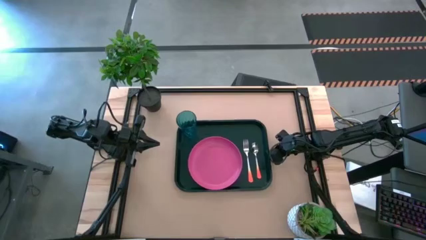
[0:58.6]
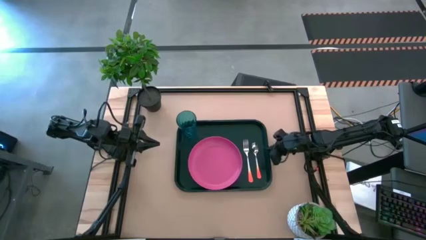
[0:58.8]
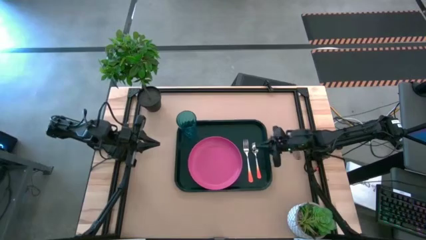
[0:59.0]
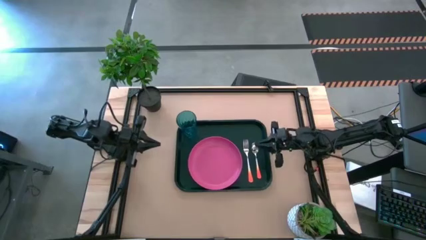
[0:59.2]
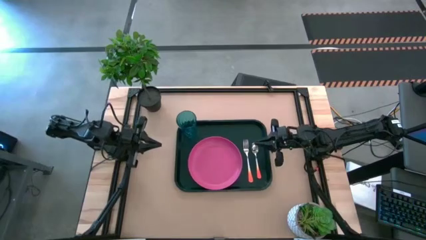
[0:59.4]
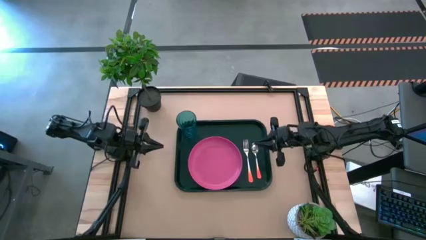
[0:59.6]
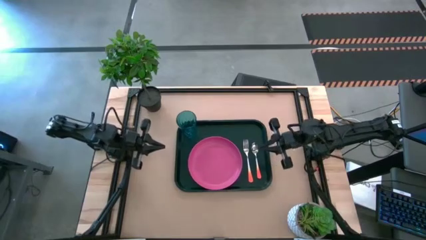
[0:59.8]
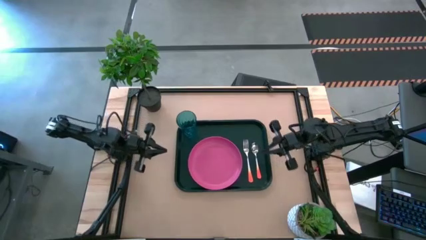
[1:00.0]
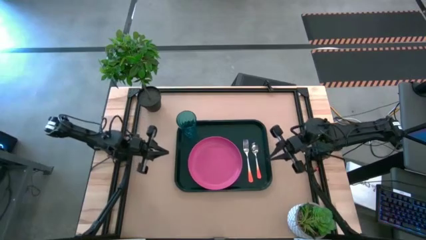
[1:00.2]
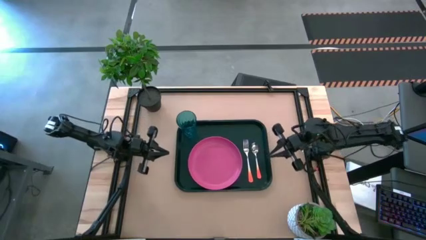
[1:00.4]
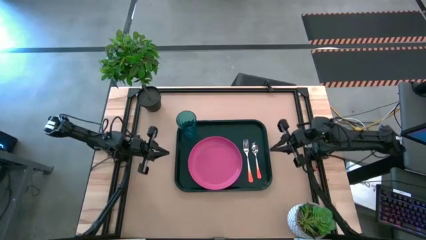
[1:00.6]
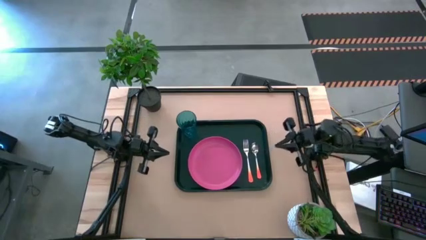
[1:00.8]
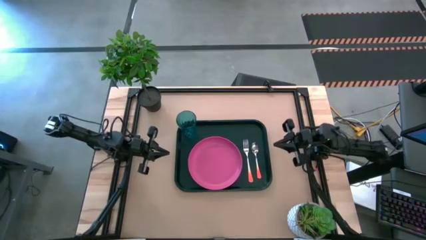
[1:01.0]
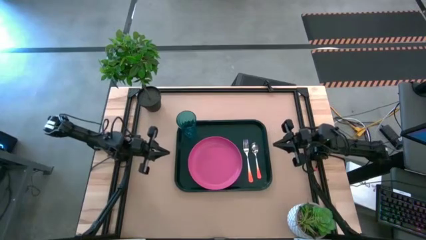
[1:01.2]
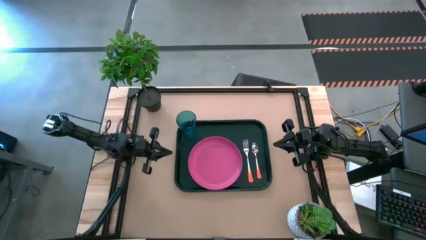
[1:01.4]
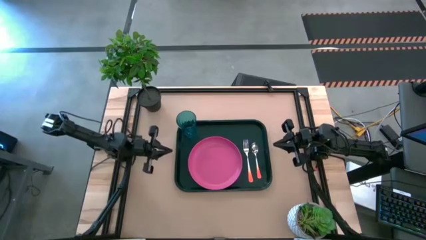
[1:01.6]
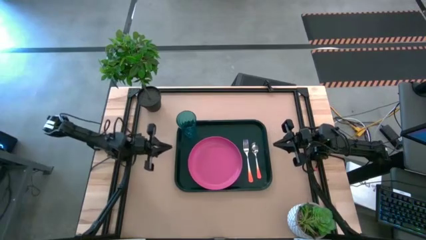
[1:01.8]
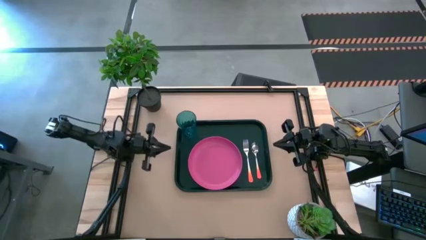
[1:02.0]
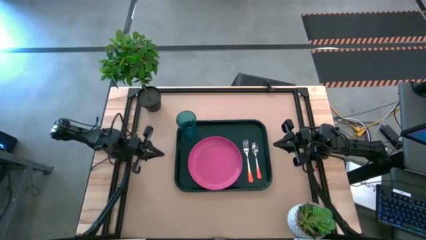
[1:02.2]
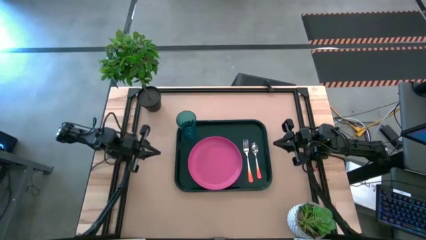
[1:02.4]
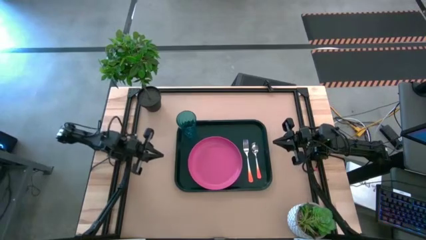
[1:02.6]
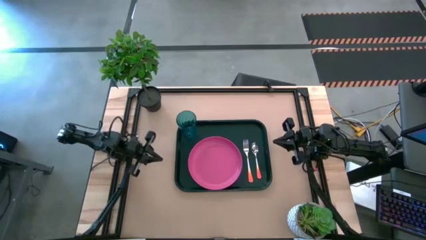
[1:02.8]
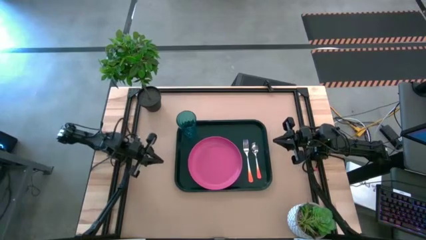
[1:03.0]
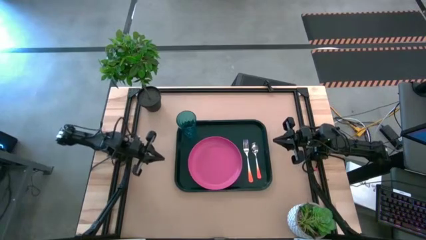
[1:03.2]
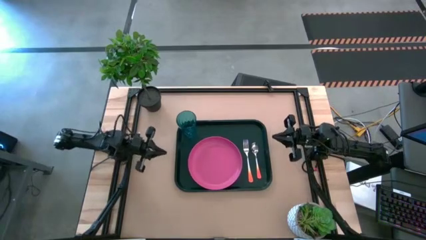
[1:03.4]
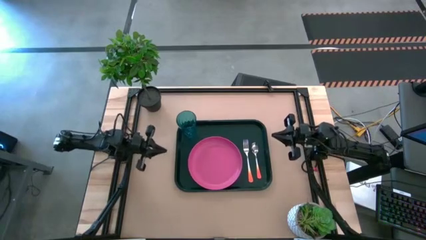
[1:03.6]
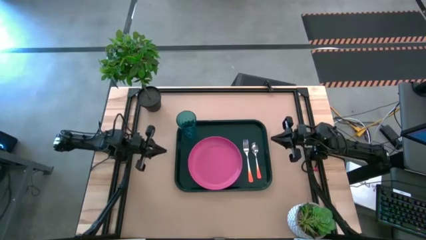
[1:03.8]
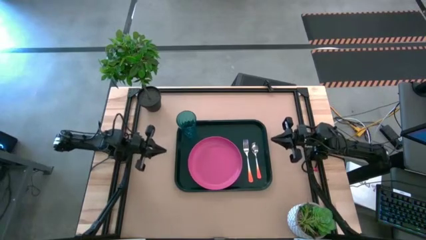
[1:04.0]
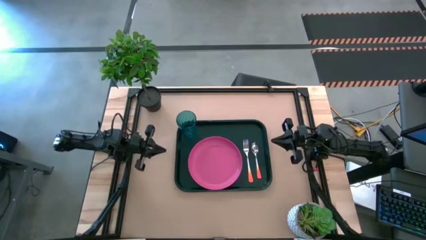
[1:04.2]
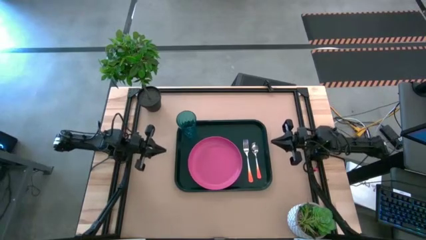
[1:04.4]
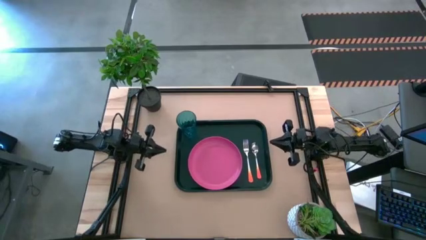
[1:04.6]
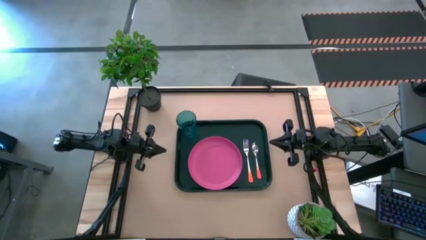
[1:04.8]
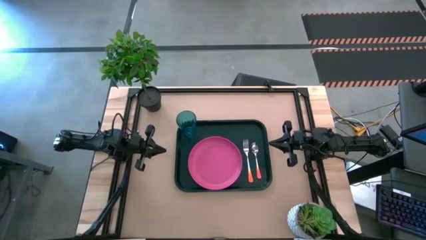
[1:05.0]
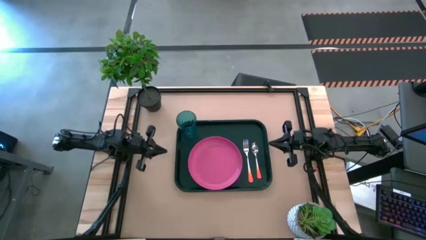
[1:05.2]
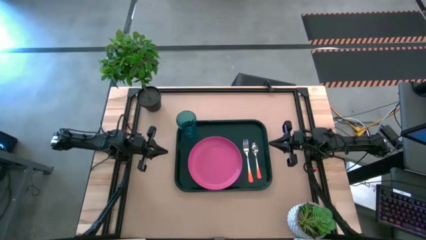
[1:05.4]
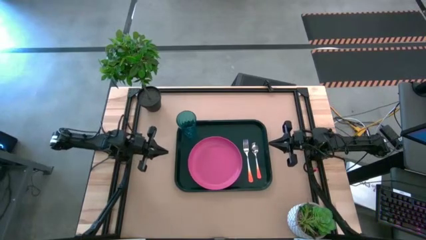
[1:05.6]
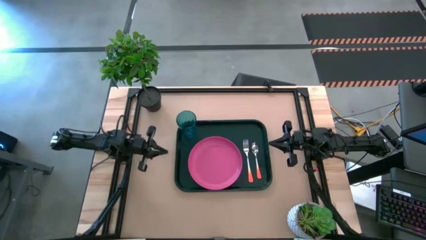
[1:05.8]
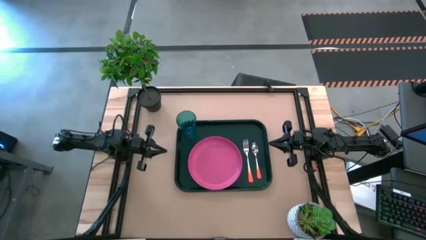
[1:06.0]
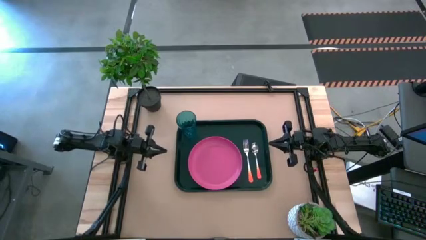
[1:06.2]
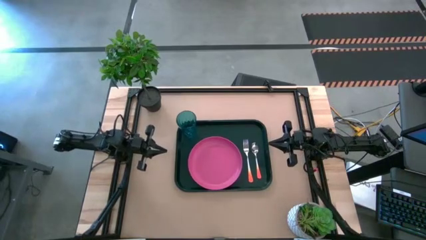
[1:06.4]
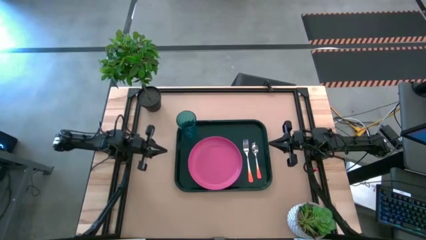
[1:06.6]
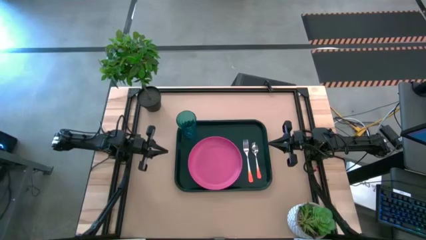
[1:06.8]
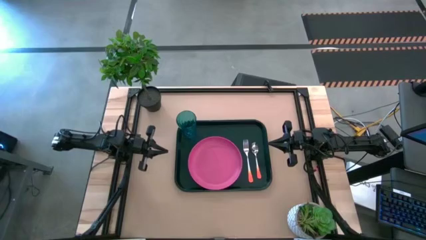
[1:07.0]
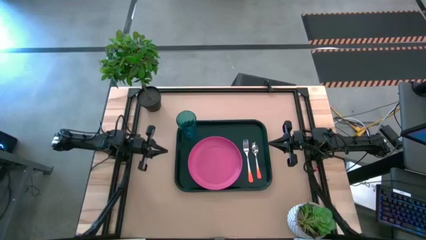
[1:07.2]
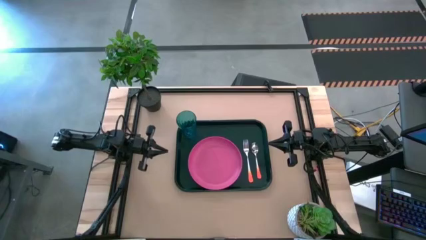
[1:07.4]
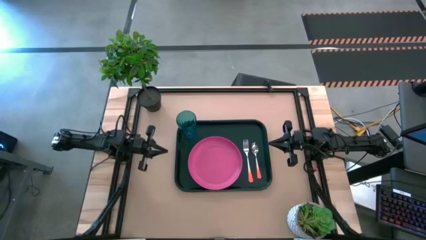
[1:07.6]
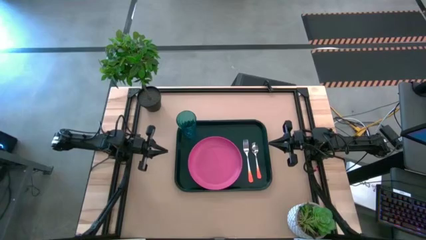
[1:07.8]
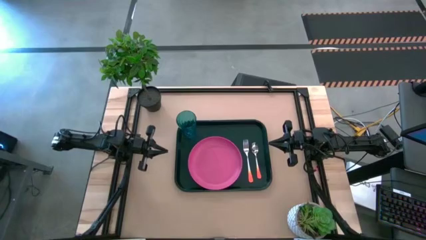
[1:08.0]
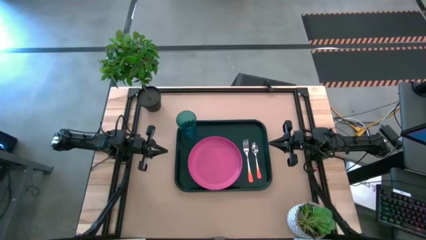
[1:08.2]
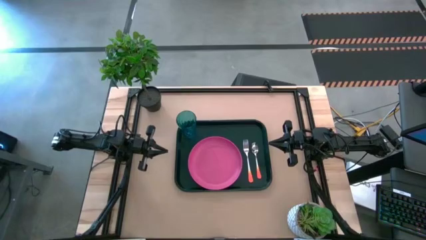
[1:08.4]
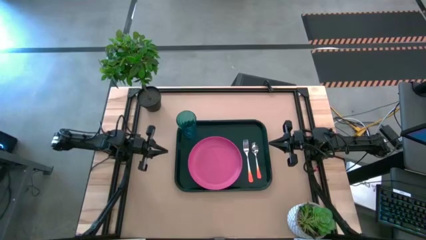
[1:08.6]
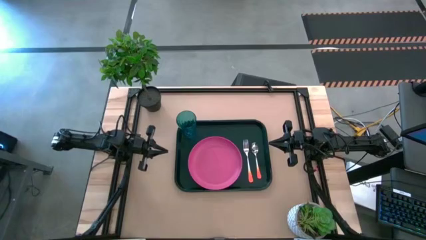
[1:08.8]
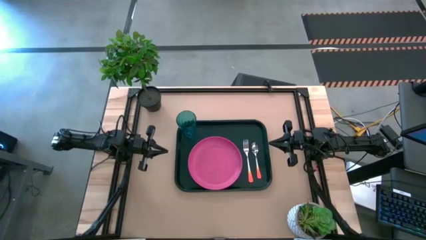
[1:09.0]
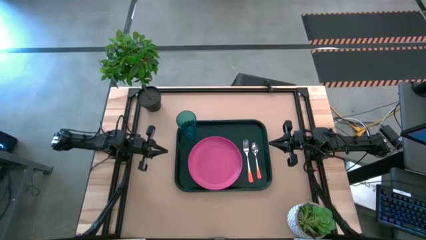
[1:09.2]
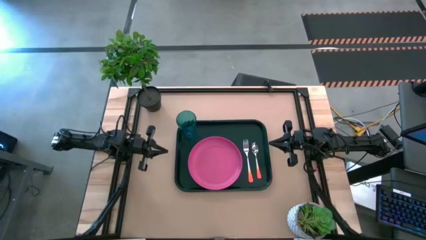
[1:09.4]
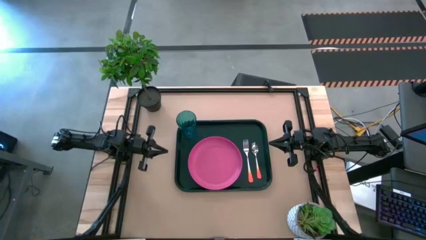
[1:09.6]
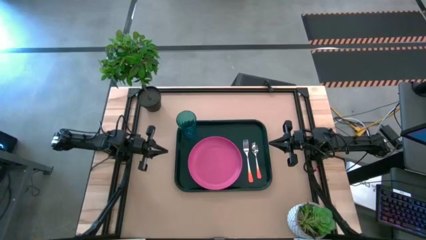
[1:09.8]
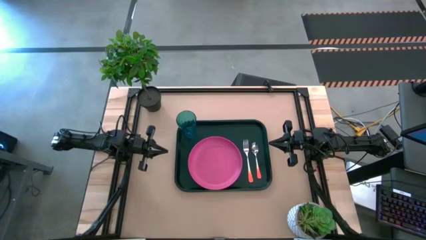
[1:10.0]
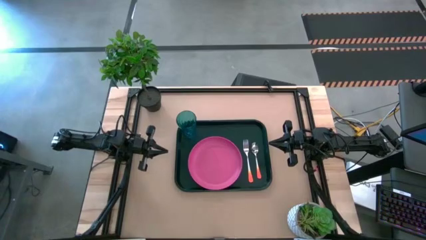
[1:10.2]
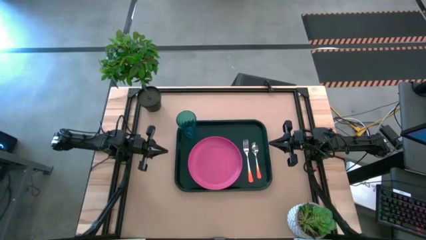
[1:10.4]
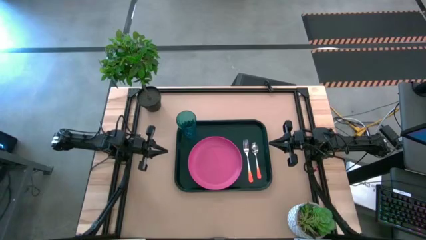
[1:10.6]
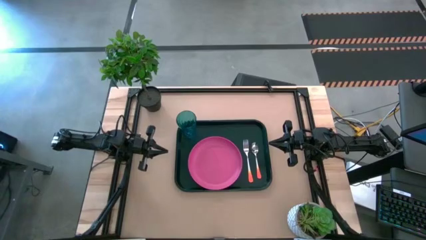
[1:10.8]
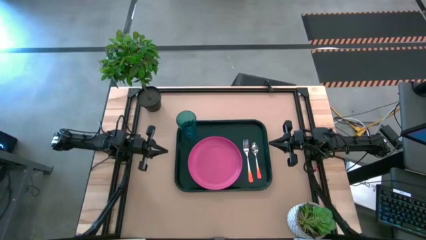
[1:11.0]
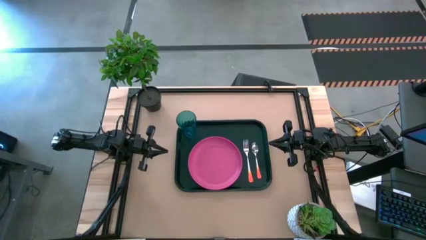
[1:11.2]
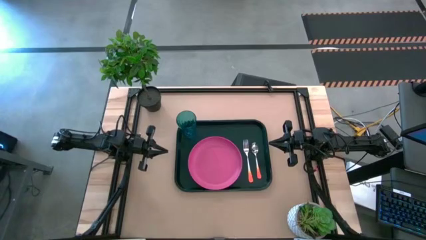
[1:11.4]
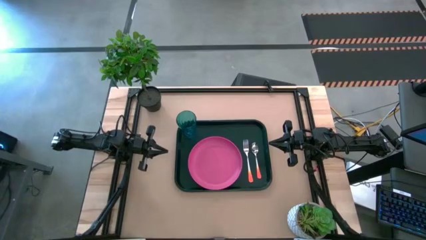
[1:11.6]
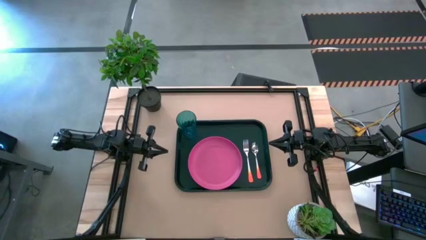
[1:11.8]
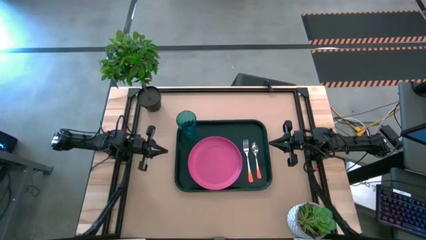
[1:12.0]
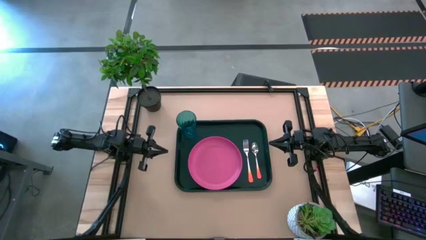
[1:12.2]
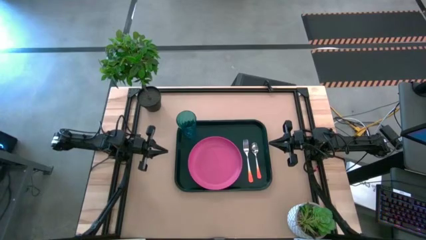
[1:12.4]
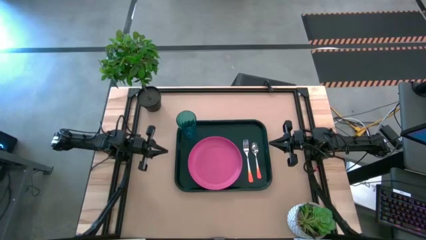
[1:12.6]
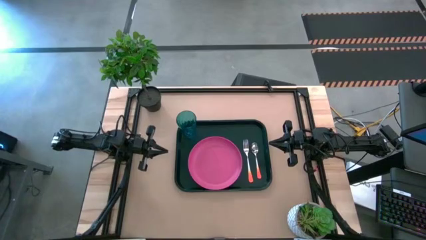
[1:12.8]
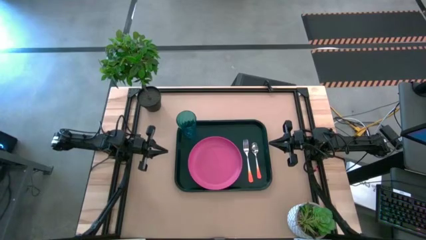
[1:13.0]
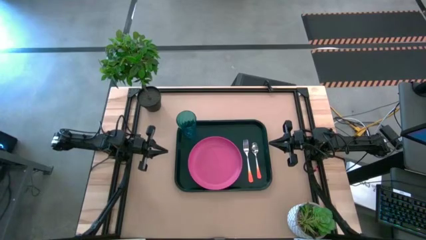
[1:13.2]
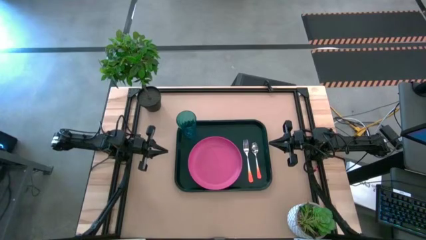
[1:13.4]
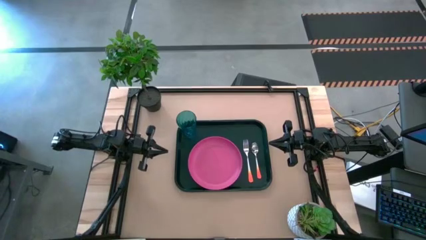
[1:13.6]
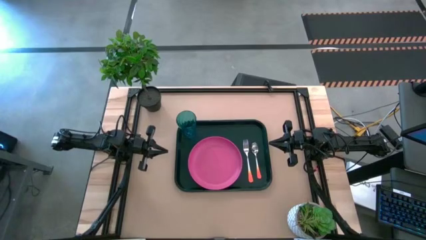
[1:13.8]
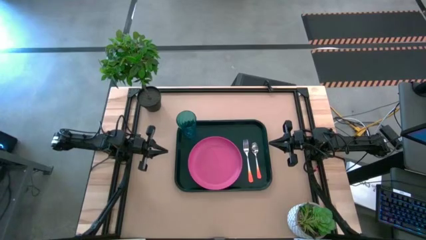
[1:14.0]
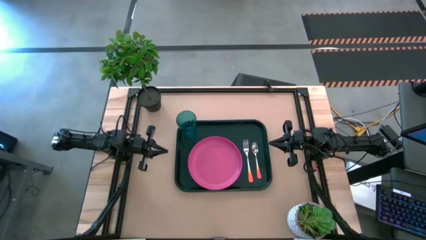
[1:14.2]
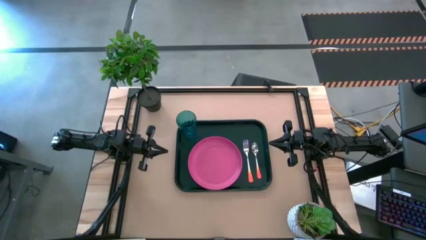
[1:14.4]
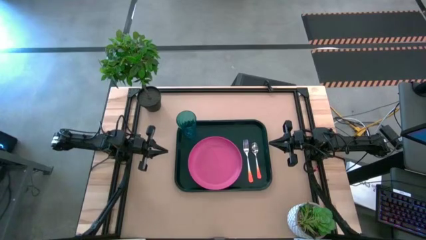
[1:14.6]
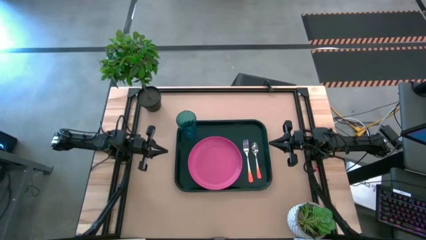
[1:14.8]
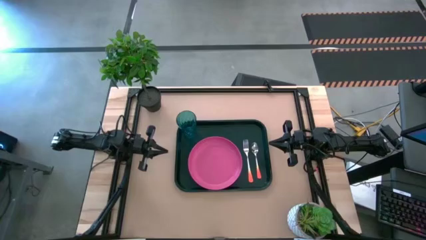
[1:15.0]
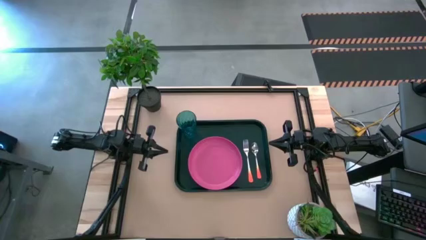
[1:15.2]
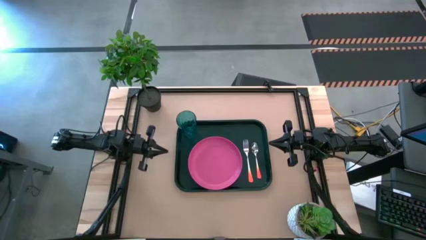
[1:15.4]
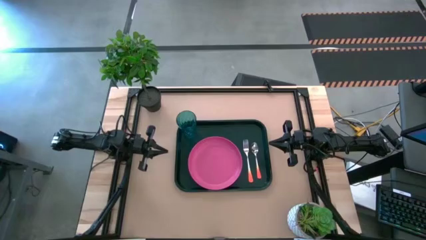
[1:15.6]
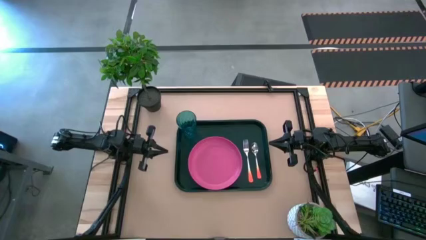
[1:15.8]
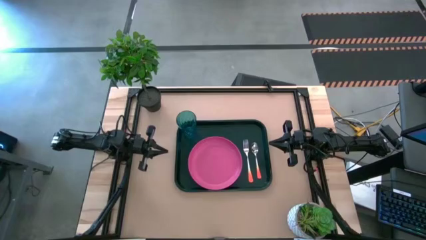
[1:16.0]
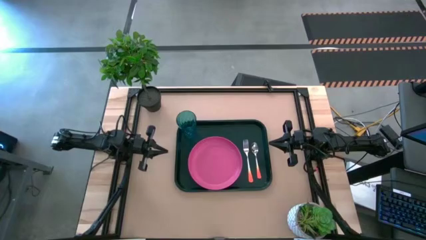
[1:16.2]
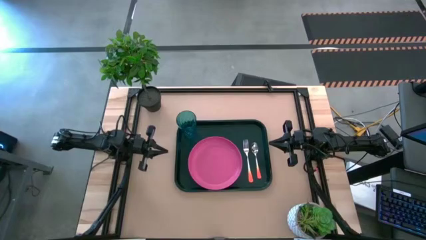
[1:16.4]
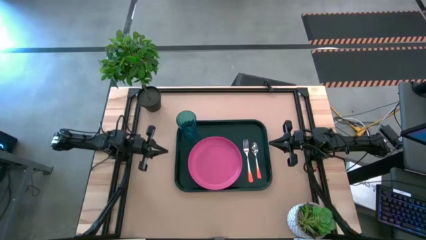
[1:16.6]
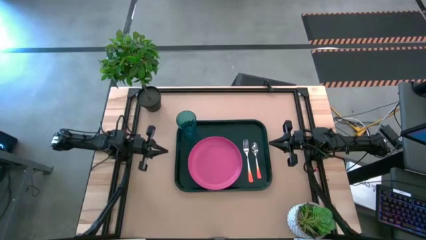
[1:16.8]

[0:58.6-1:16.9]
Task: Pick and place plate/cup/fork/spoon on tray
Return to Home Position
